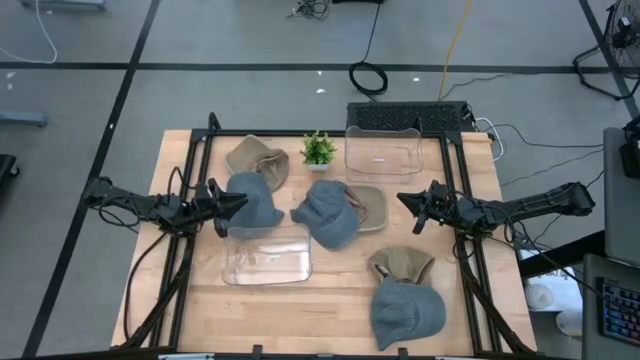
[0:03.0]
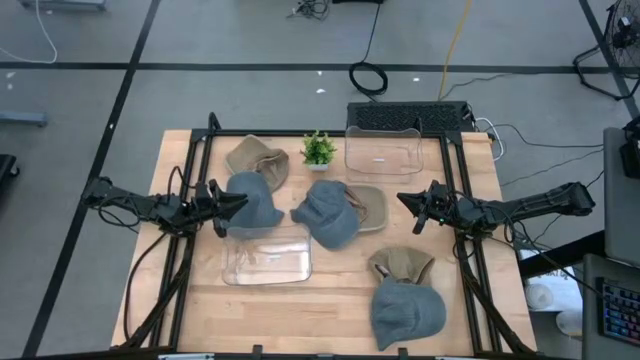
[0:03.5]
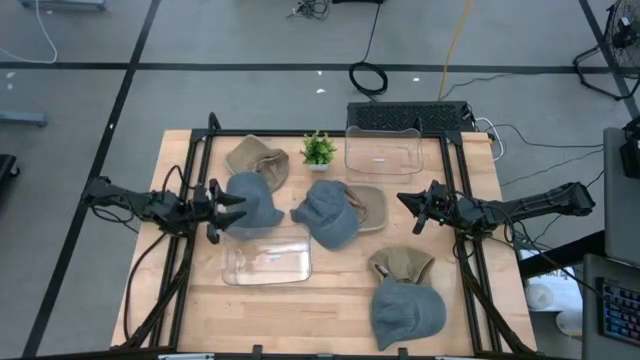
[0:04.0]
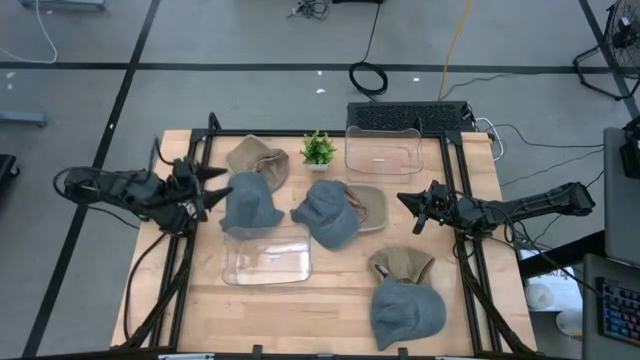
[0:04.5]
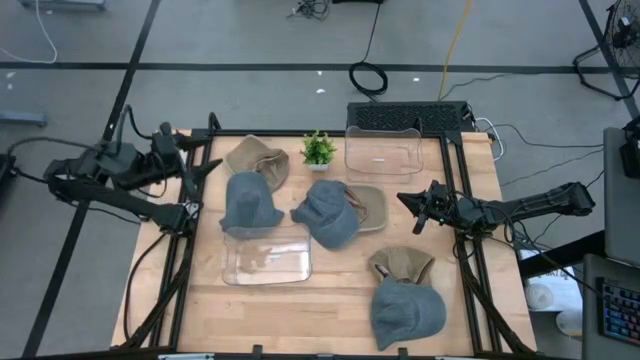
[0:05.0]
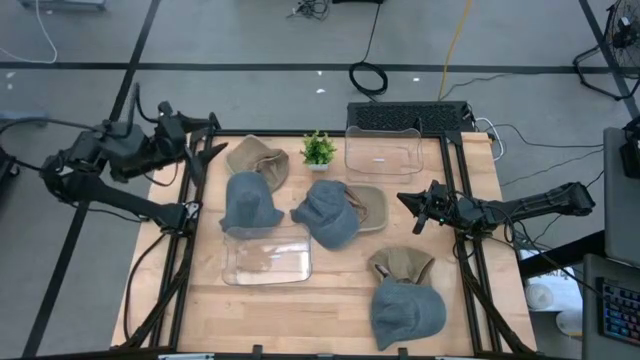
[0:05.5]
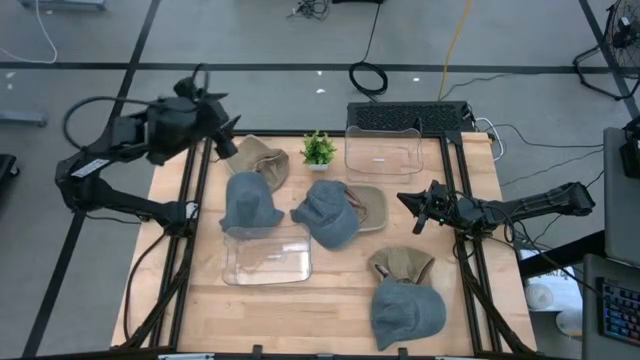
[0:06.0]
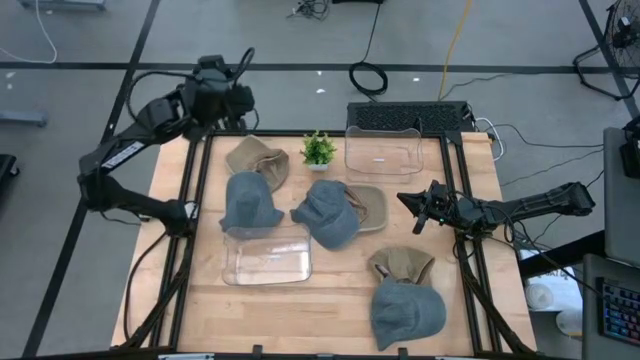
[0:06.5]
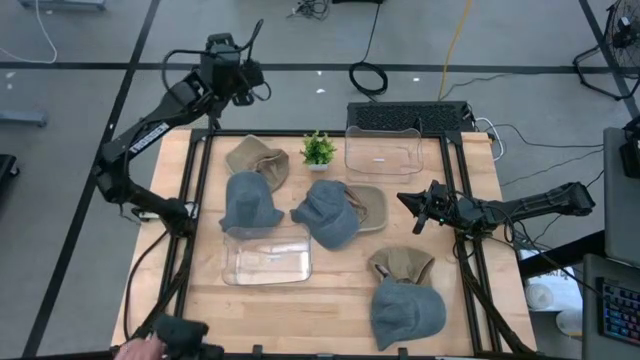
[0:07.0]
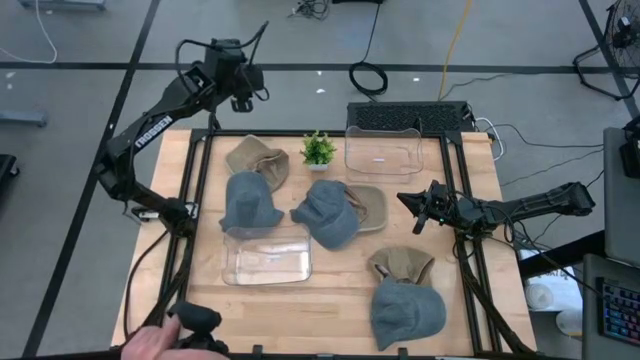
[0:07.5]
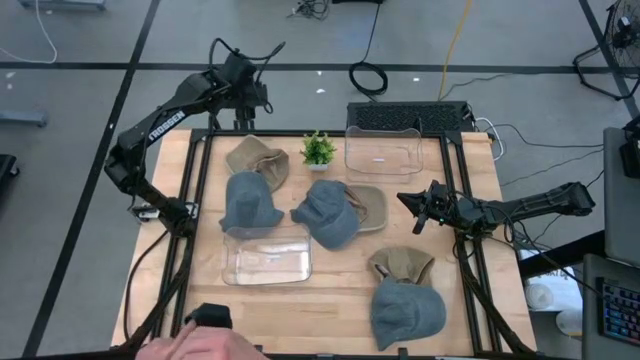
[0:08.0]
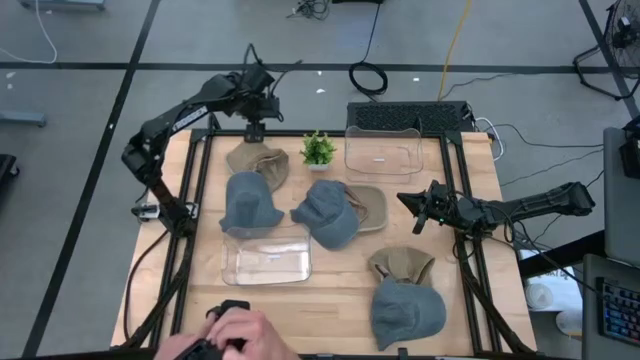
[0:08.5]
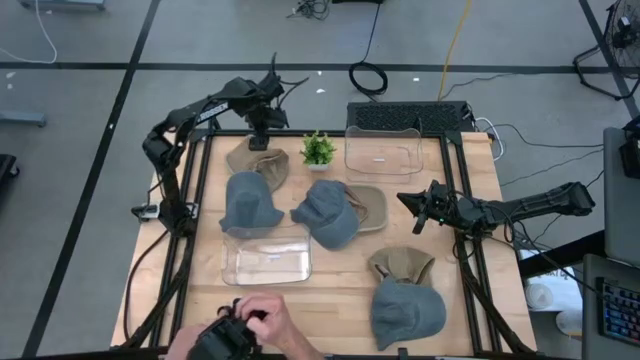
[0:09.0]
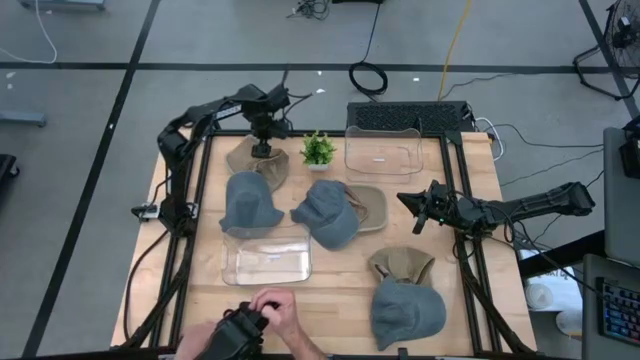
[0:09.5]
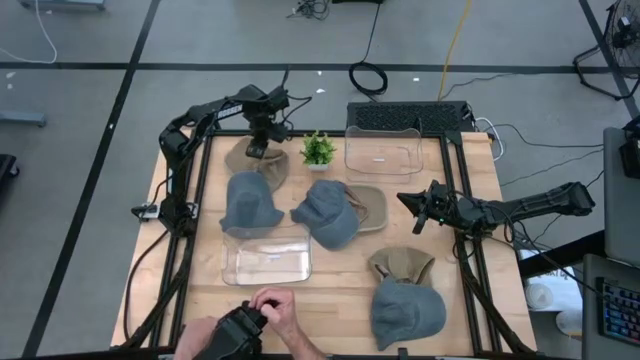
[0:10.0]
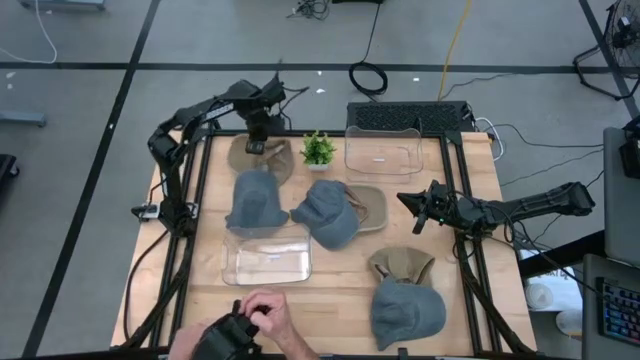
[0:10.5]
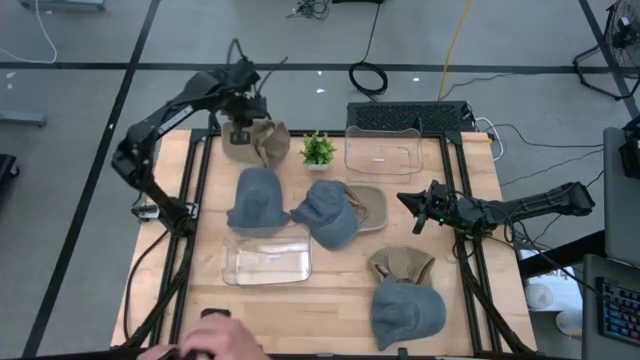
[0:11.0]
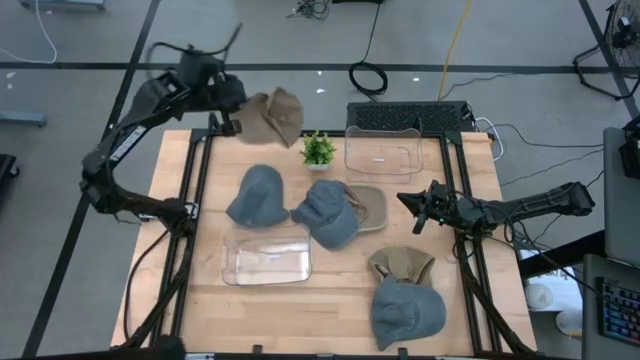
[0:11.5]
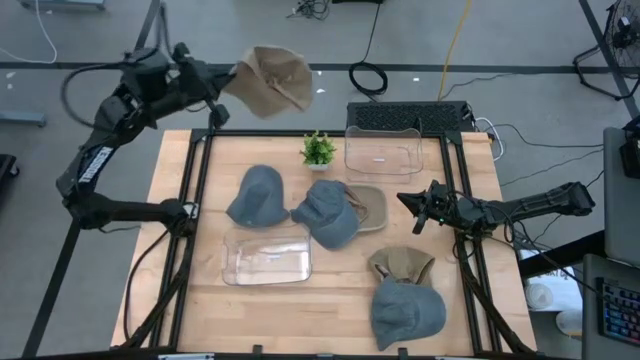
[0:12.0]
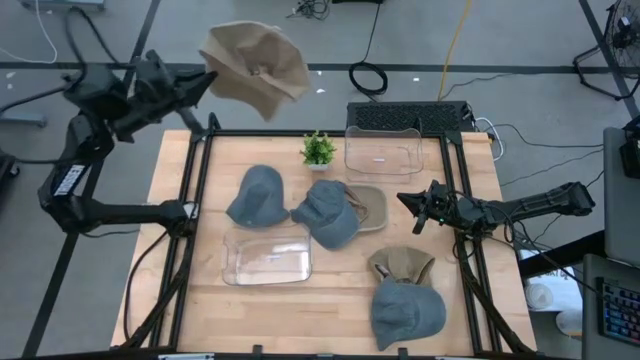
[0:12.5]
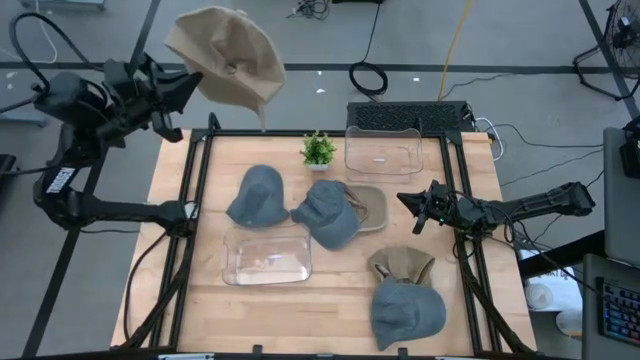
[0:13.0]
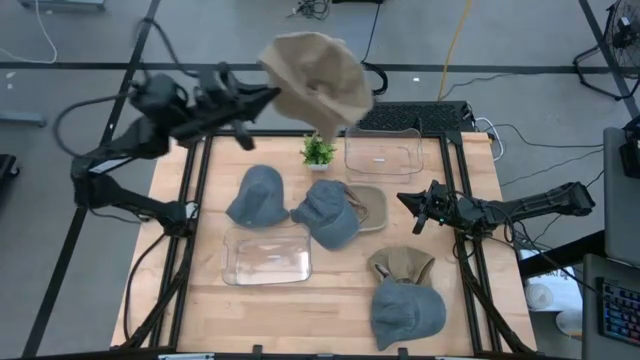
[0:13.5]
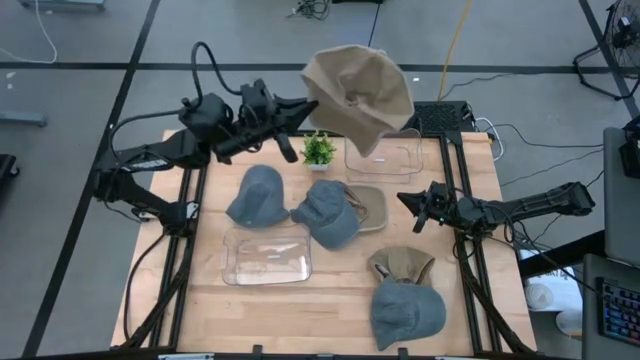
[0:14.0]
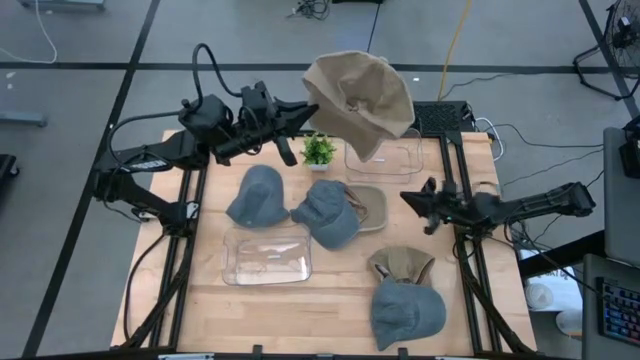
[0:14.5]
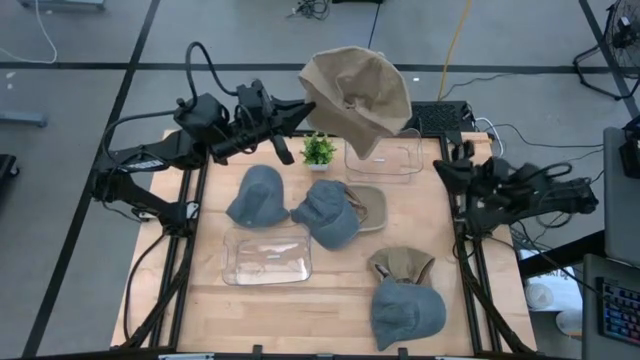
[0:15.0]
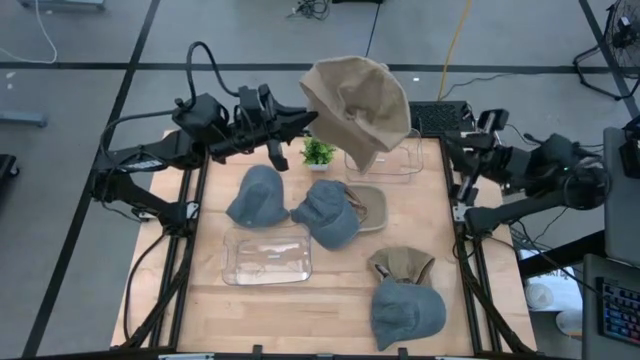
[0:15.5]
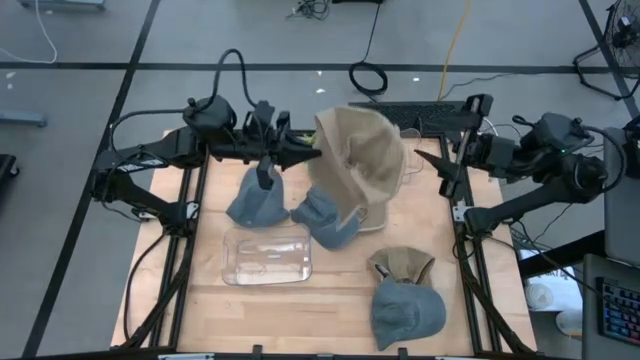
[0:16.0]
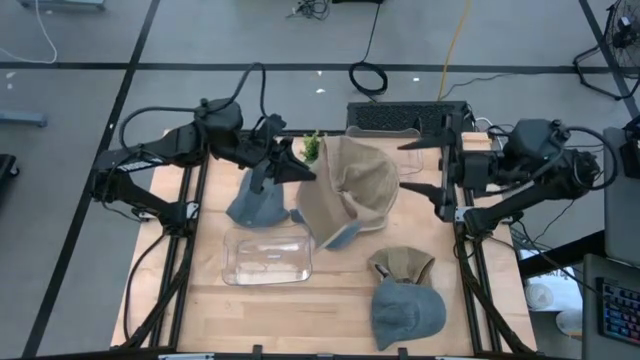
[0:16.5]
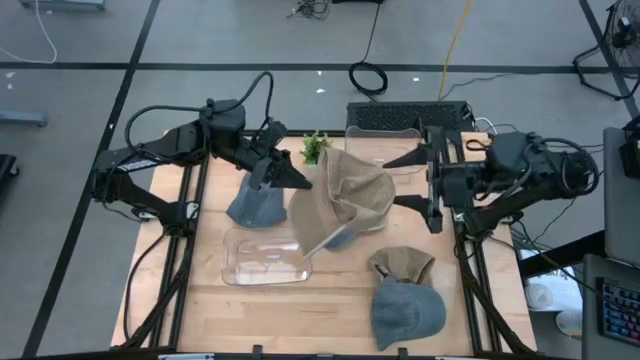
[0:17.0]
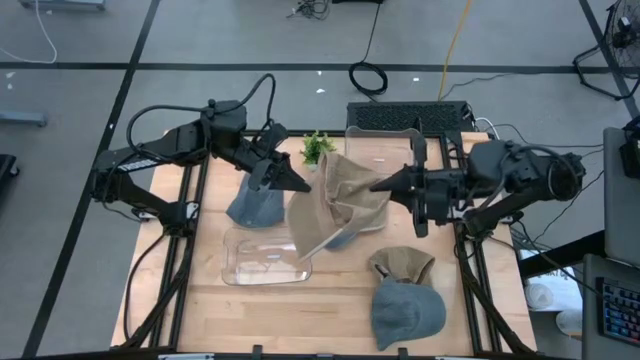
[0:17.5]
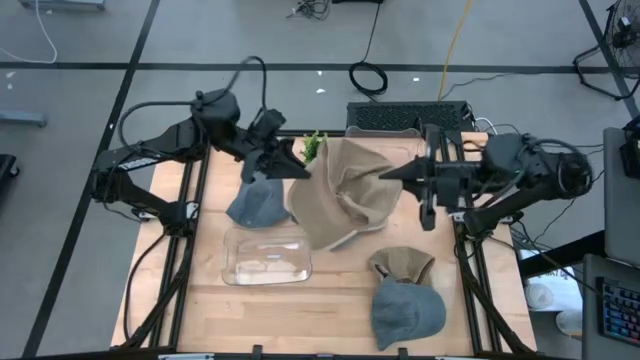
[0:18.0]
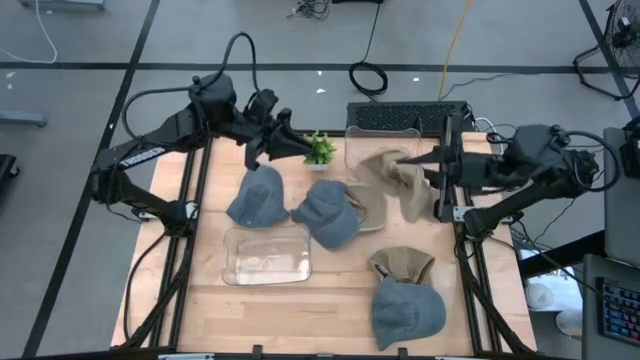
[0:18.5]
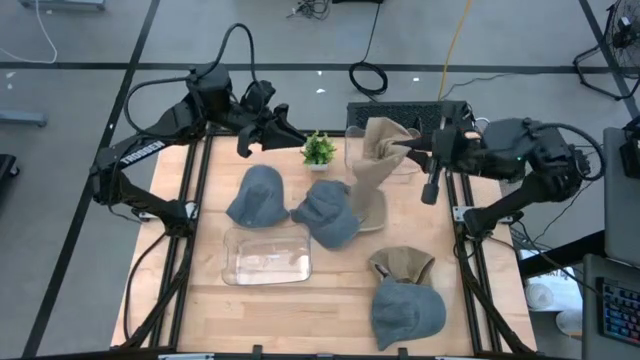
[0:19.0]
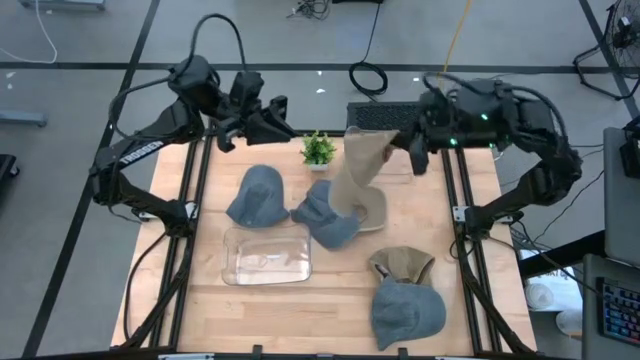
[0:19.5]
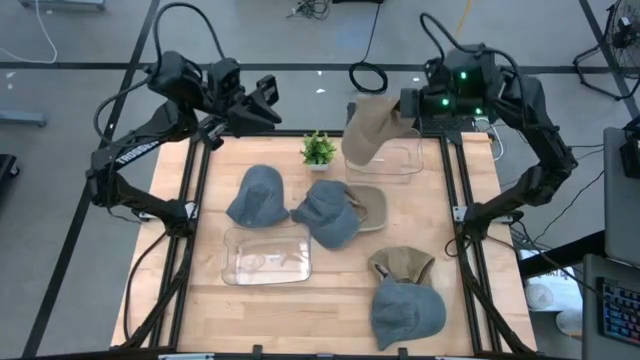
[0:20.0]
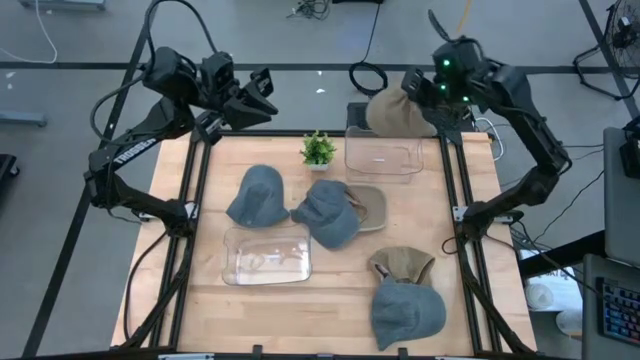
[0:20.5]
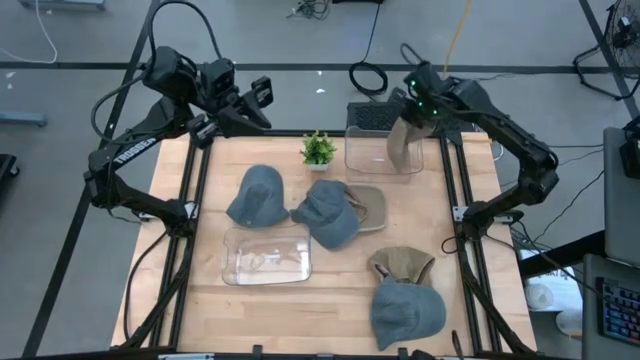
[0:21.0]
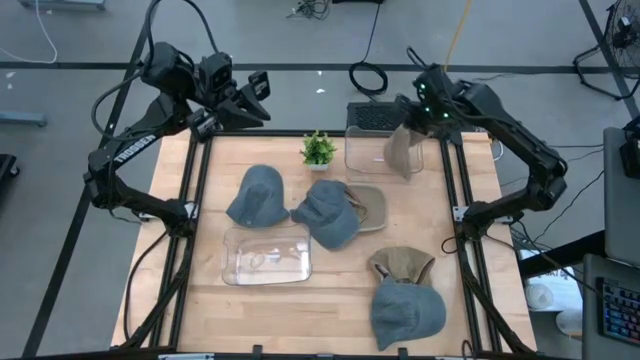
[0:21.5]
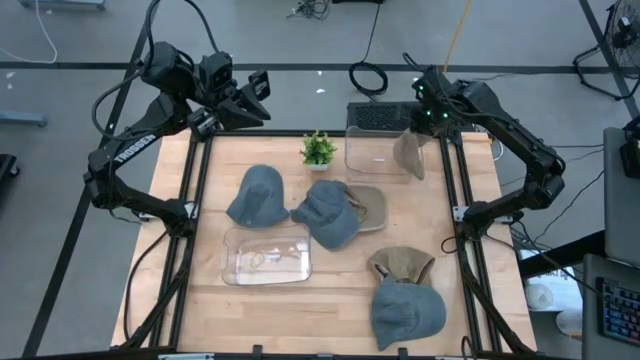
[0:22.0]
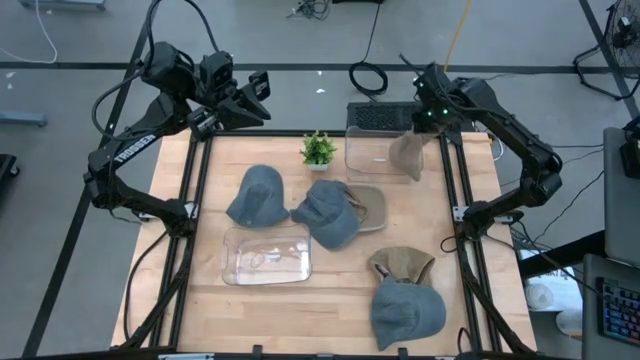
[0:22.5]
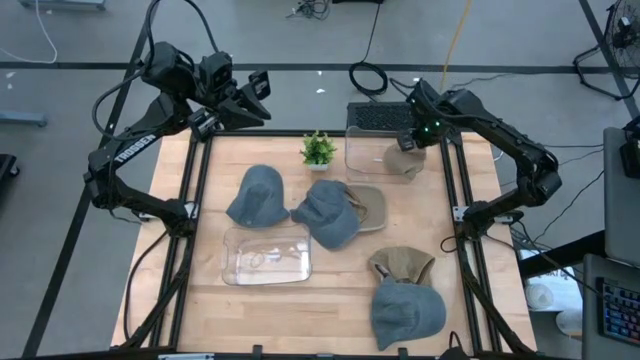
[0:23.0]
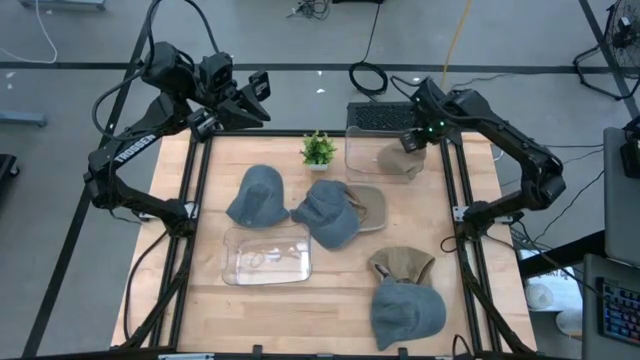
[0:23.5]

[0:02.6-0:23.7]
Task: Pick & Place hat
Put the top left brown cap into the top transparent bin
